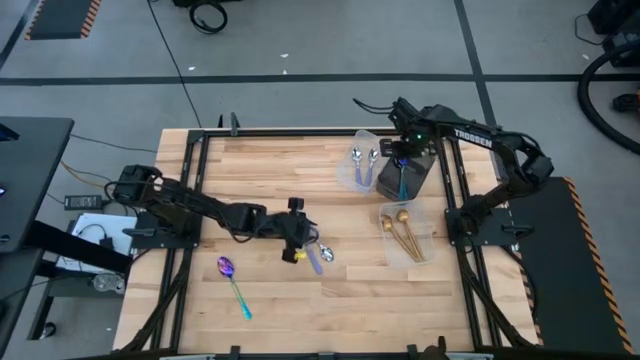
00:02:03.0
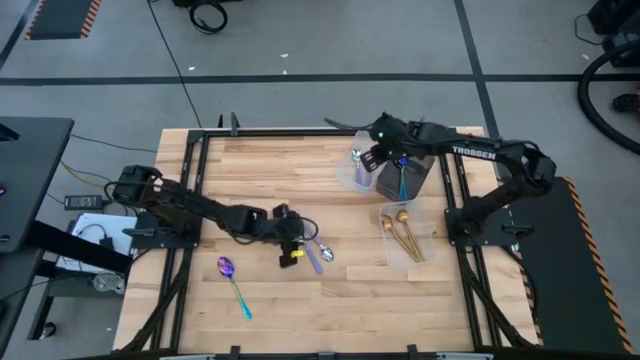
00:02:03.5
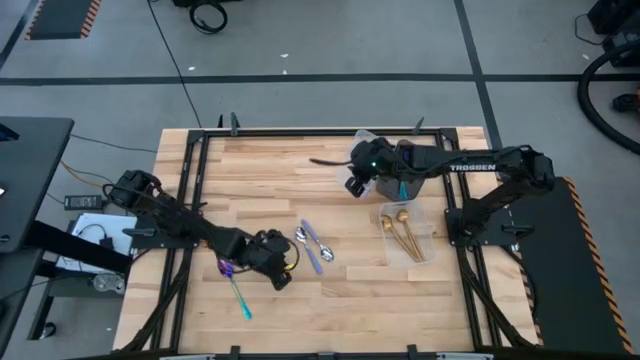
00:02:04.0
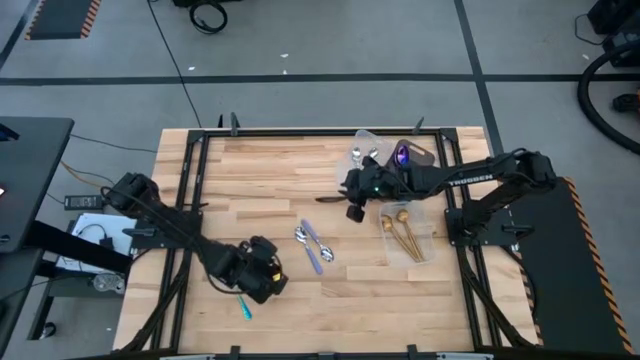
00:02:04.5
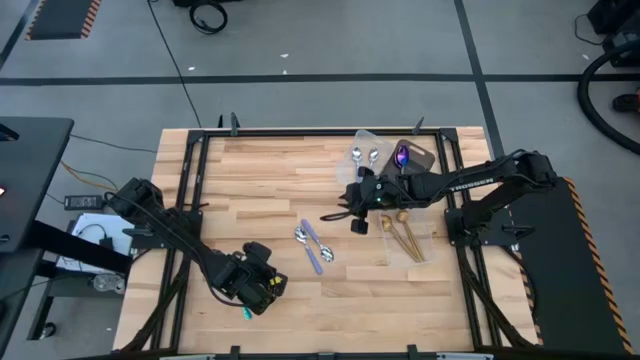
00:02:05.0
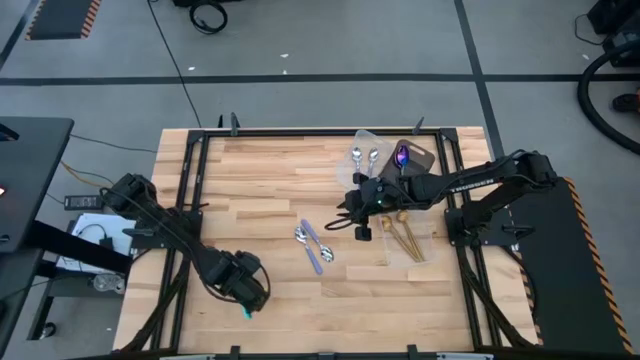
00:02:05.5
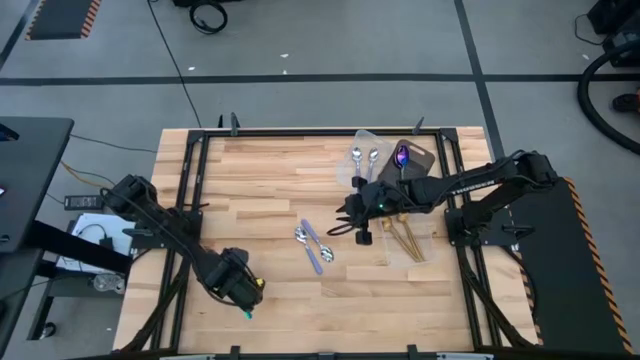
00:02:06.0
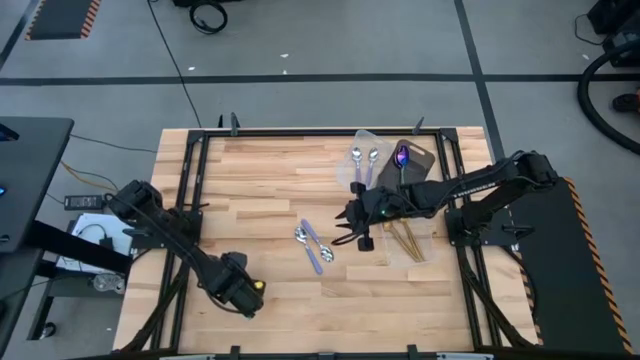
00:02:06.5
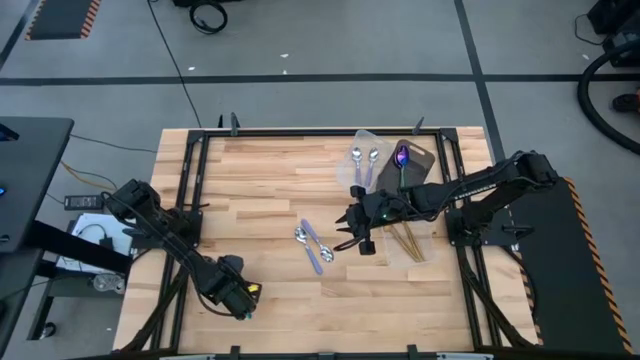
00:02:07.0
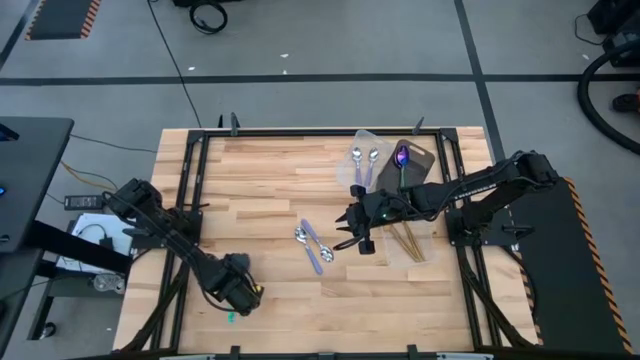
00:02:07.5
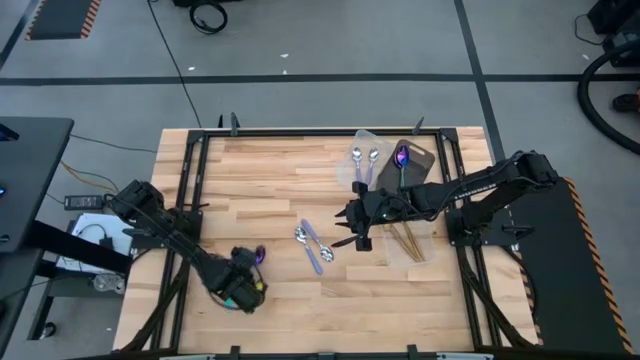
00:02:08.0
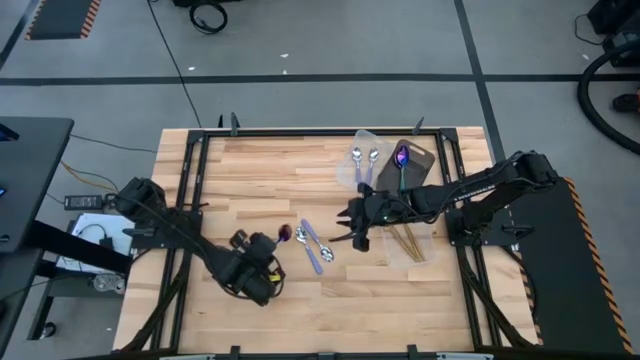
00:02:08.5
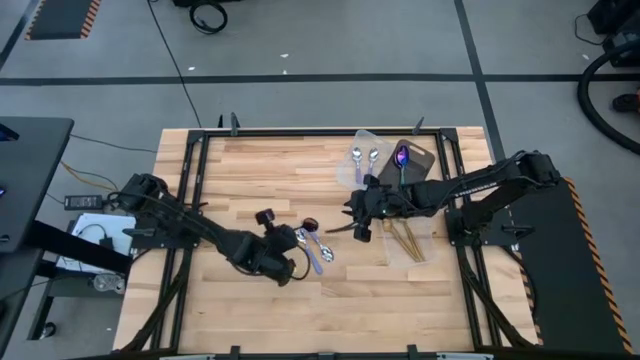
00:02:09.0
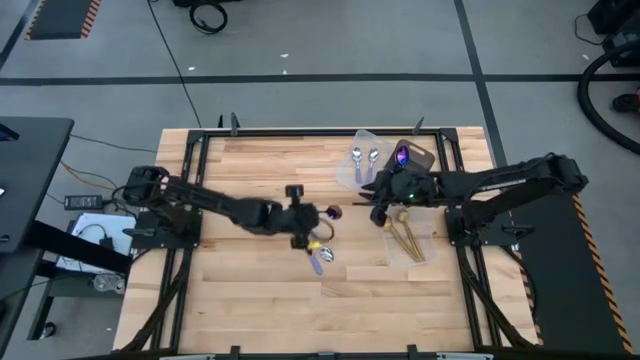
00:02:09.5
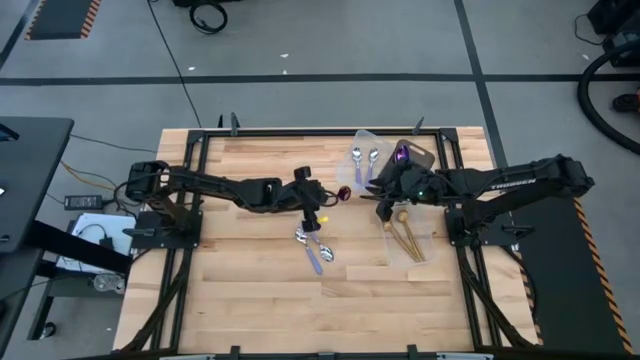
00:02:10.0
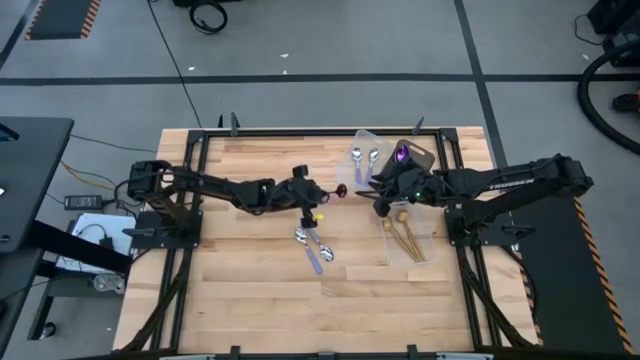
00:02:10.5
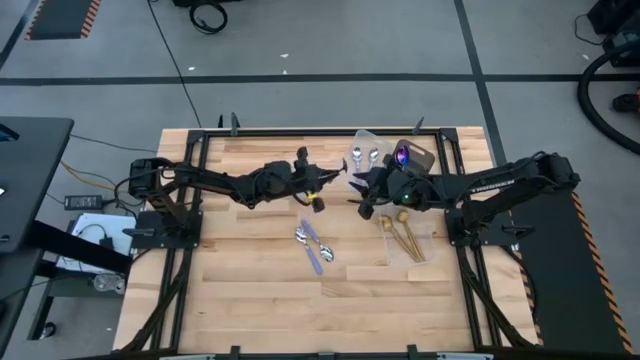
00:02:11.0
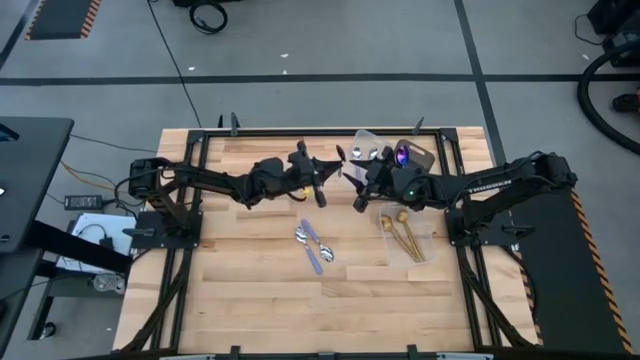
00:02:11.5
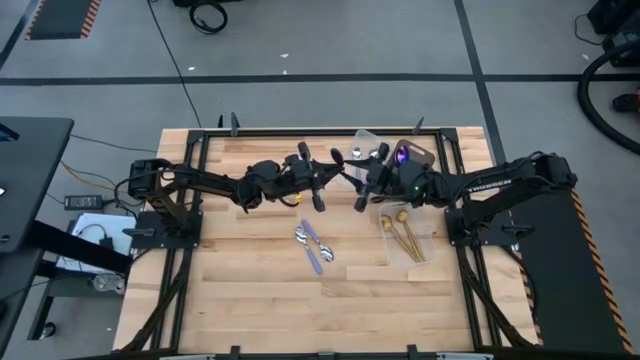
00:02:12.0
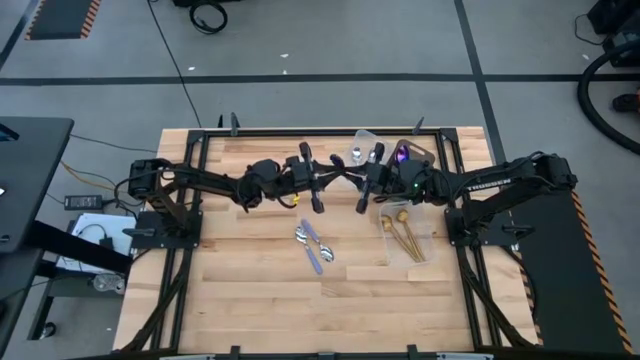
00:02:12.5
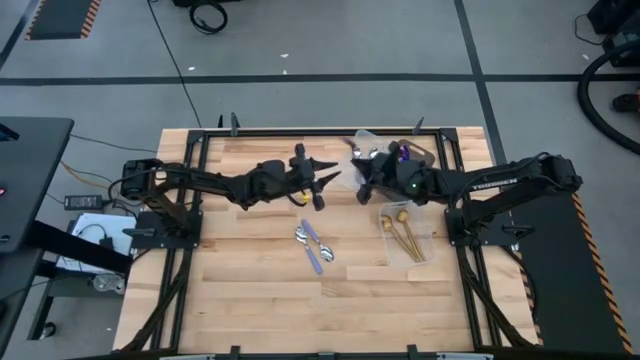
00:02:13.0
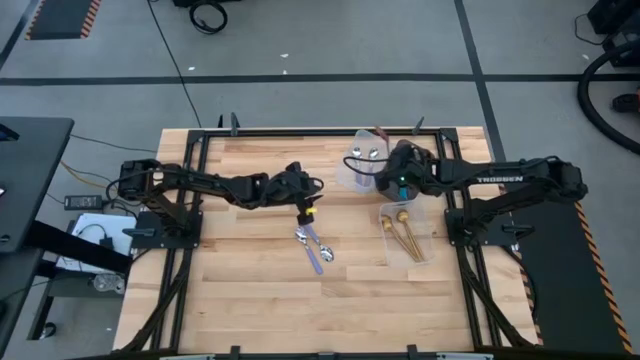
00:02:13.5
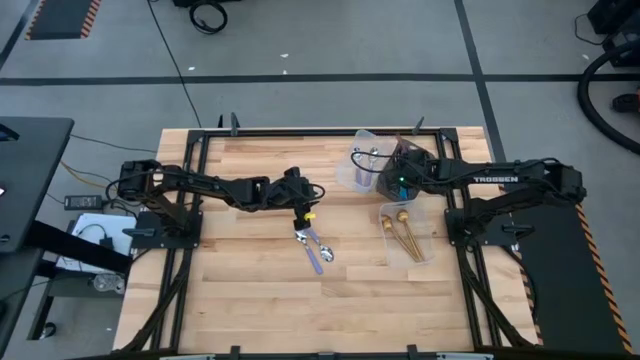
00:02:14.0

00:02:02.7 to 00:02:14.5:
Task: Sort silverware by color (type)
Put the blue spoon into the black bin

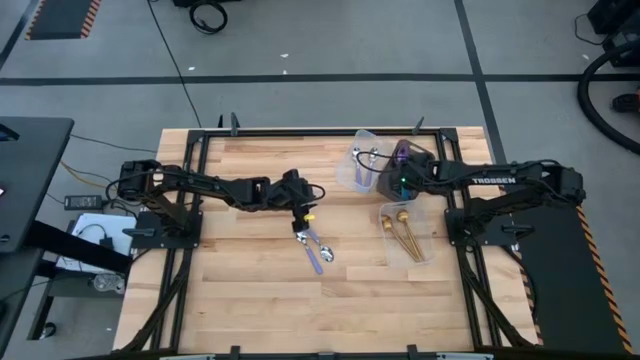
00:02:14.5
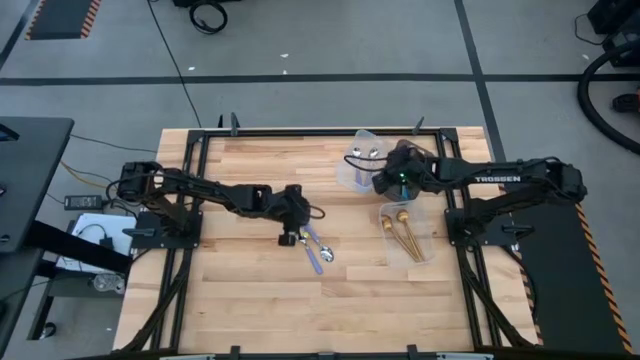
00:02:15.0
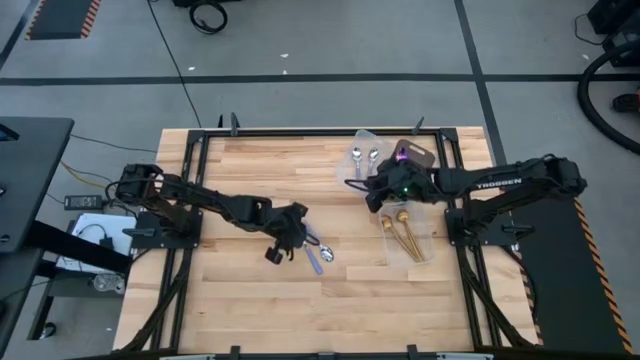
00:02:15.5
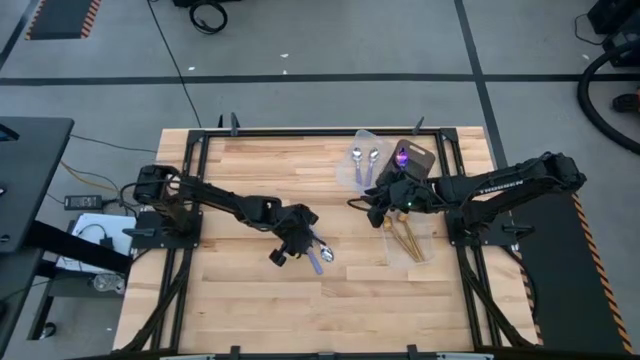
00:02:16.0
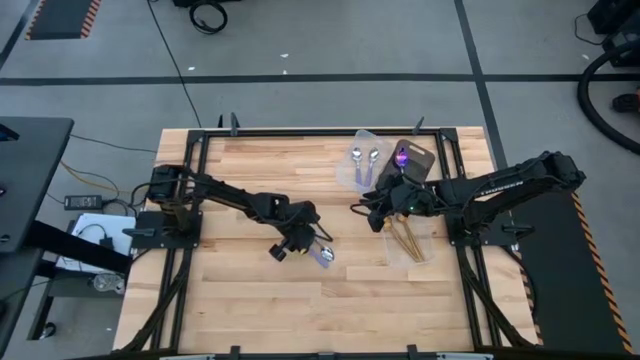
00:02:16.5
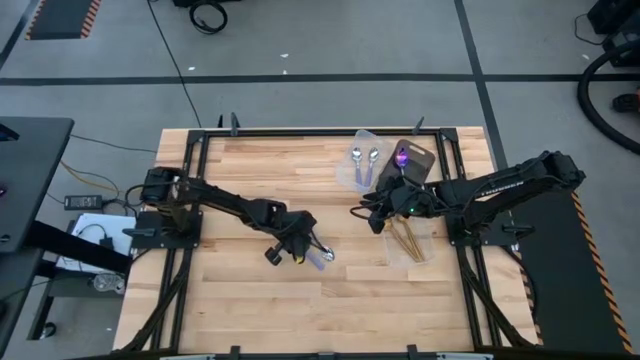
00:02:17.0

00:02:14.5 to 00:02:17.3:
Put the purple spoon into the top transparent bin

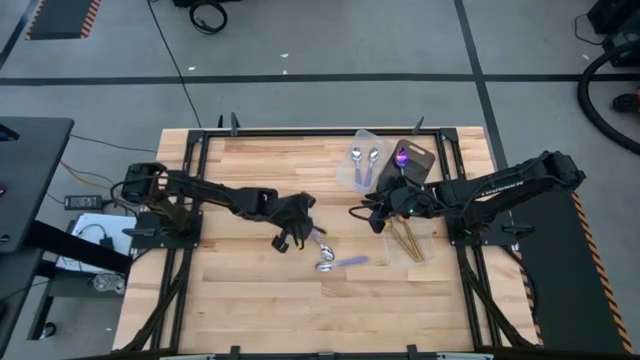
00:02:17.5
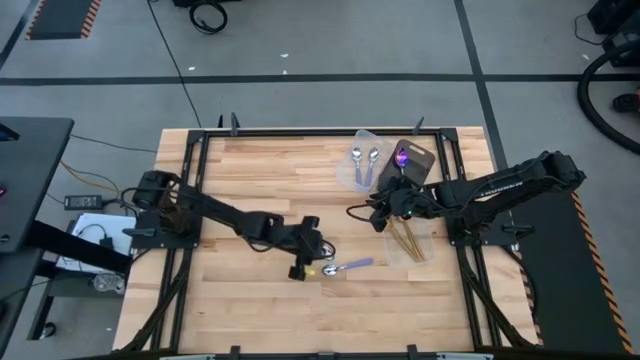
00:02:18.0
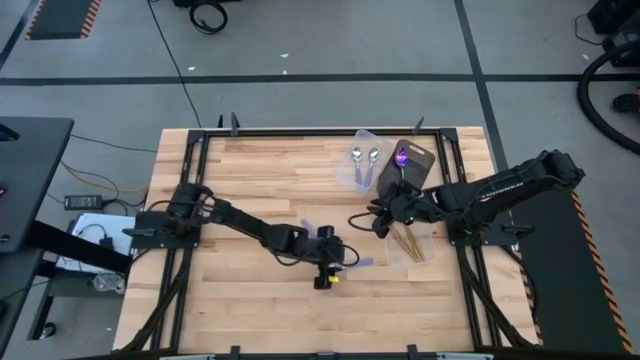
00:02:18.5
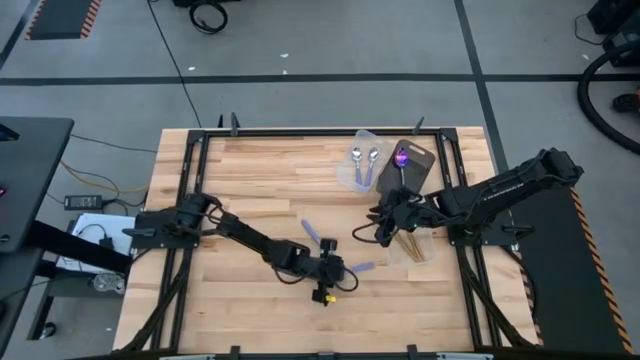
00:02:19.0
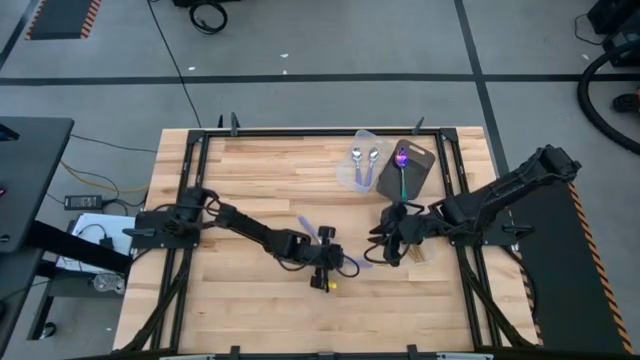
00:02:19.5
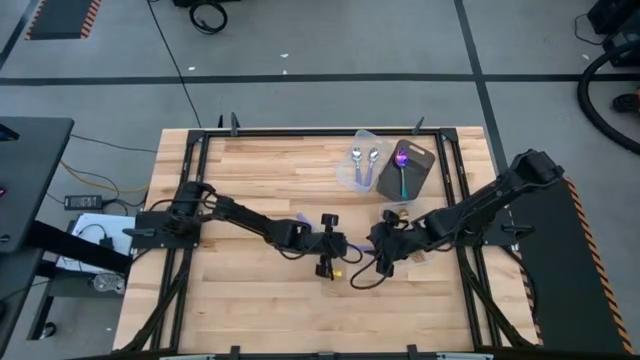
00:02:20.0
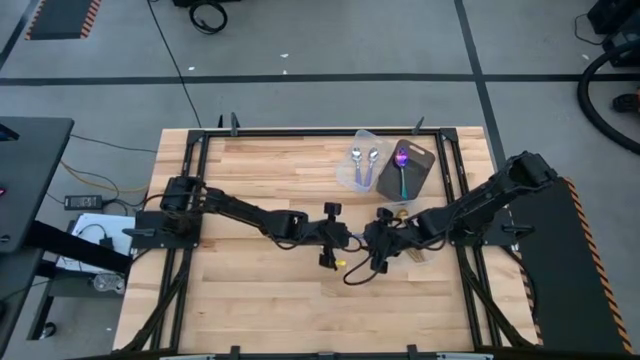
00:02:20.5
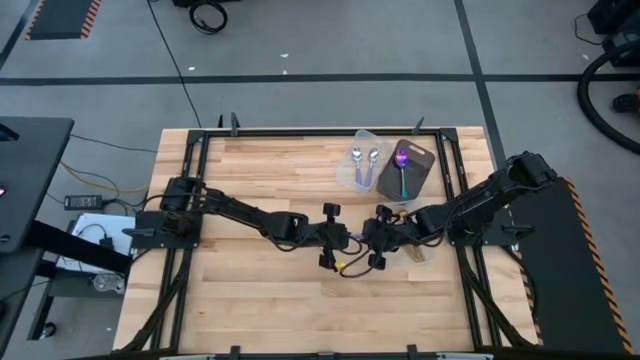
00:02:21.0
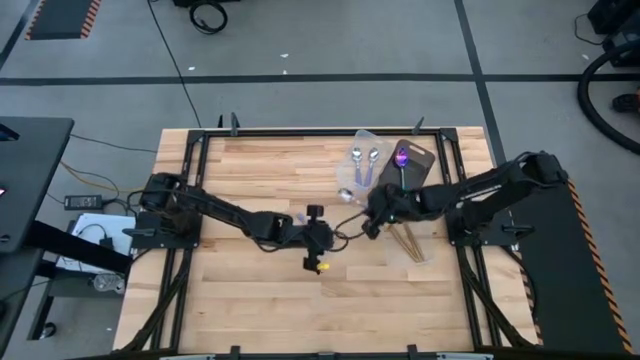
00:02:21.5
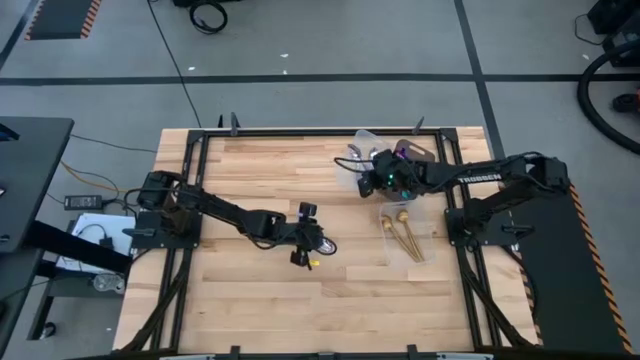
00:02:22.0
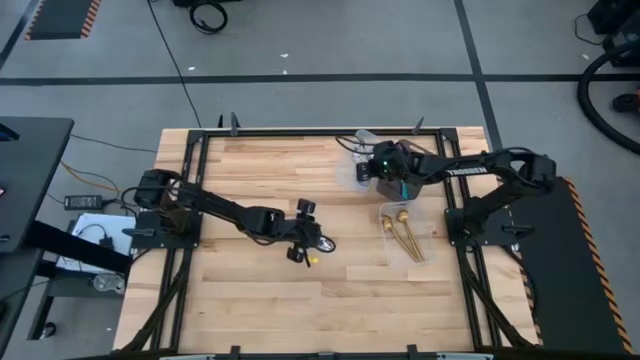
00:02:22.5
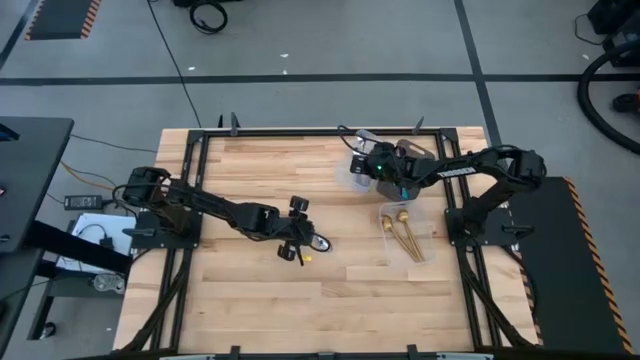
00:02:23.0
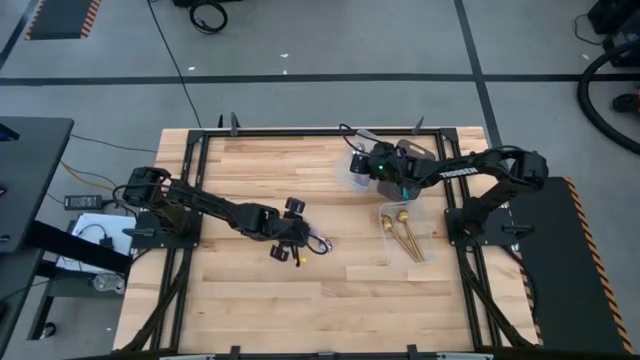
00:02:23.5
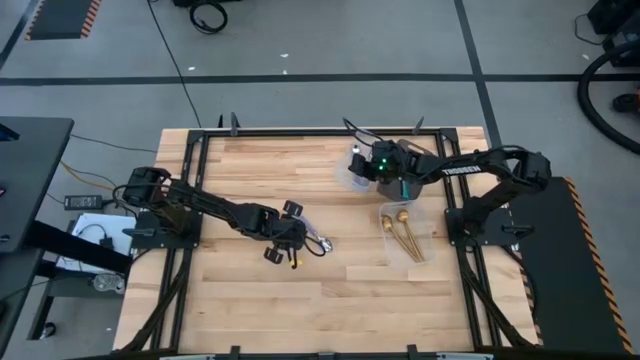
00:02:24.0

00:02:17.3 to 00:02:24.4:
Put the purple spoon into the top transparent bin

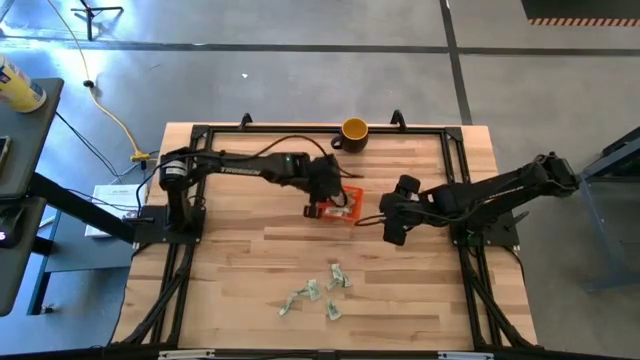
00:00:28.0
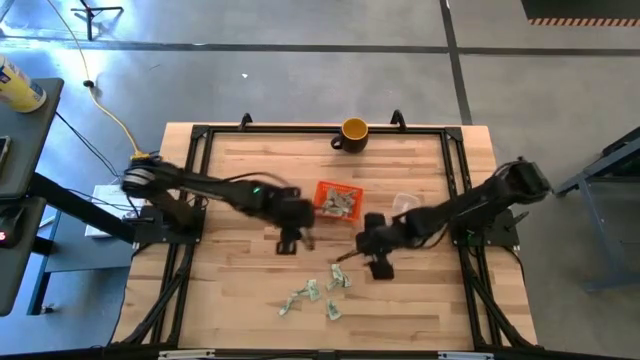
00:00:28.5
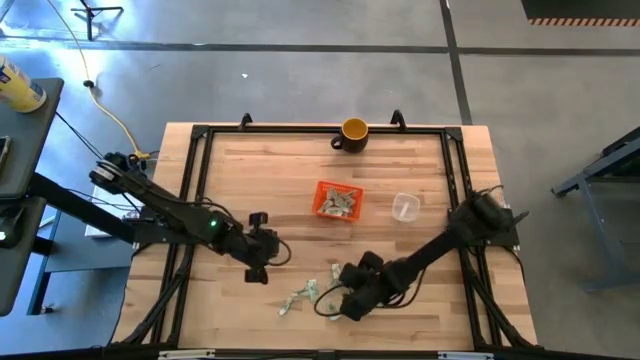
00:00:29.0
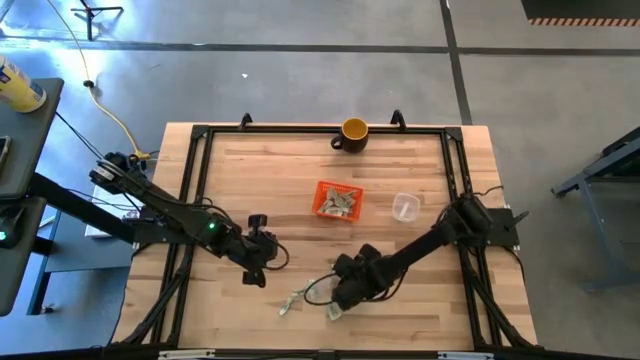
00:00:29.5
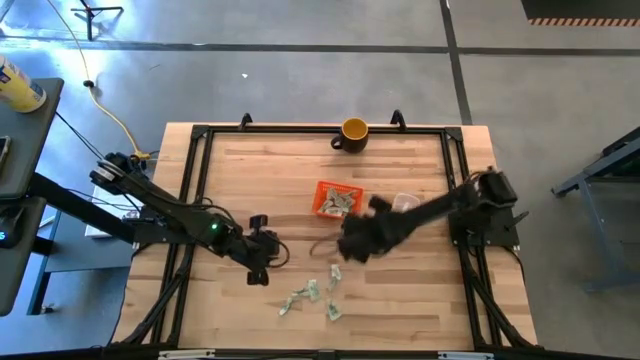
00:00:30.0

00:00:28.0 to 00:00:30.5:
Task: Pick and place items into bin
Put the green truvia packet into the orange bin
